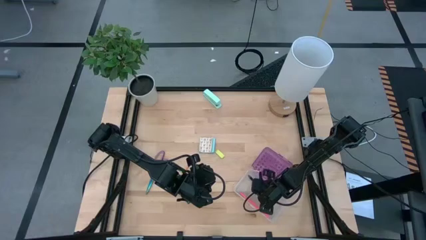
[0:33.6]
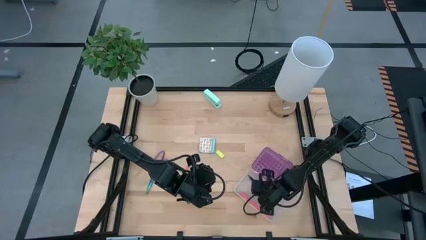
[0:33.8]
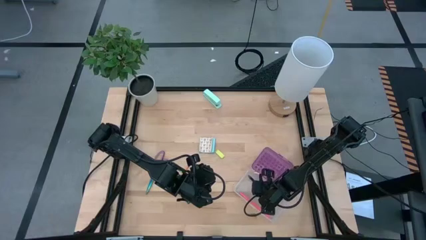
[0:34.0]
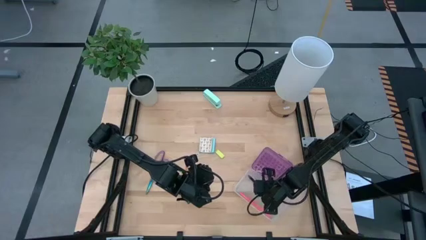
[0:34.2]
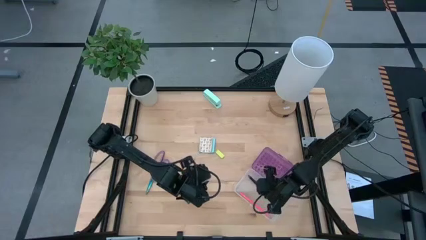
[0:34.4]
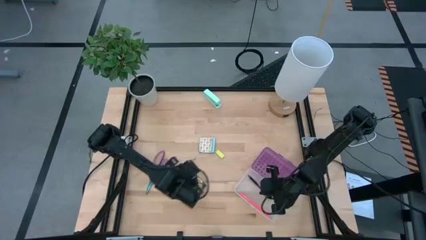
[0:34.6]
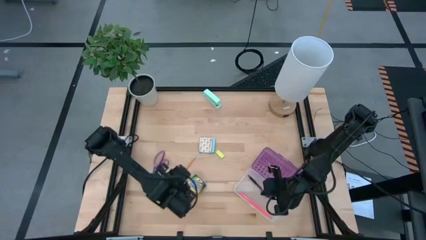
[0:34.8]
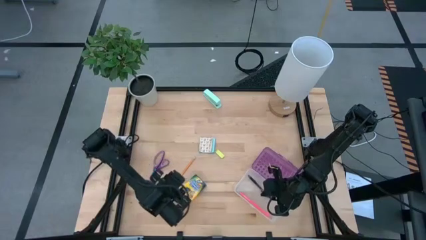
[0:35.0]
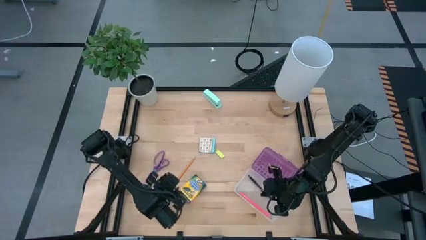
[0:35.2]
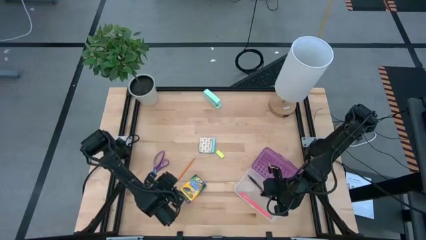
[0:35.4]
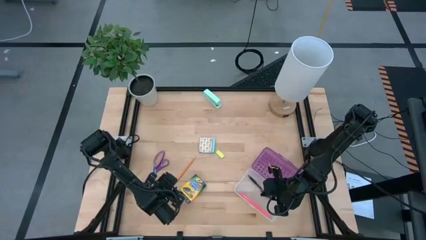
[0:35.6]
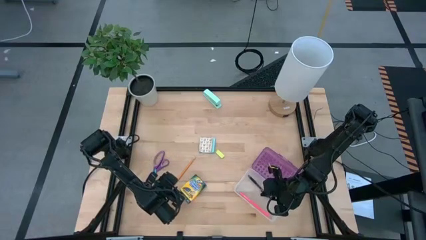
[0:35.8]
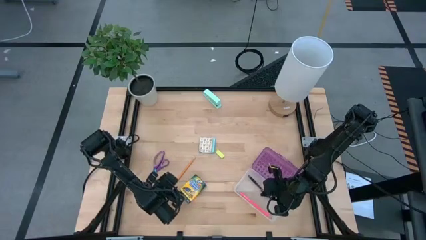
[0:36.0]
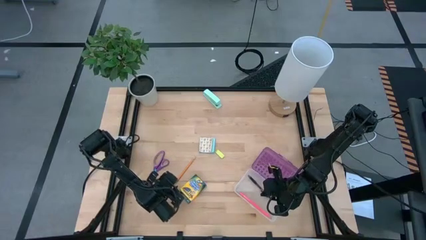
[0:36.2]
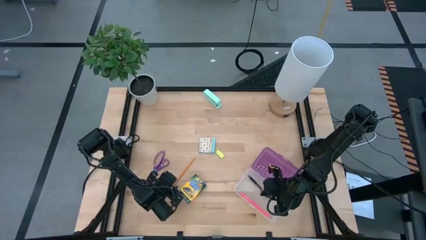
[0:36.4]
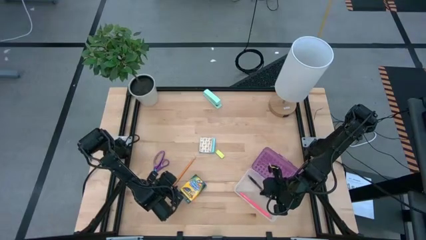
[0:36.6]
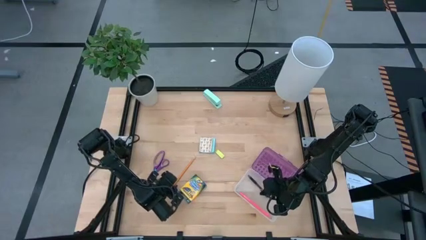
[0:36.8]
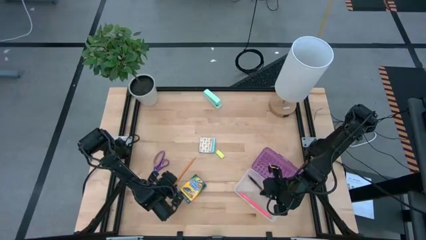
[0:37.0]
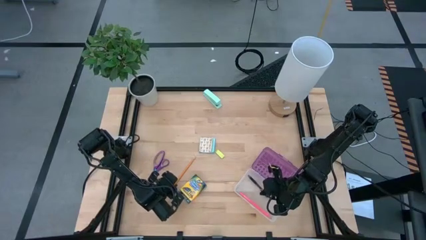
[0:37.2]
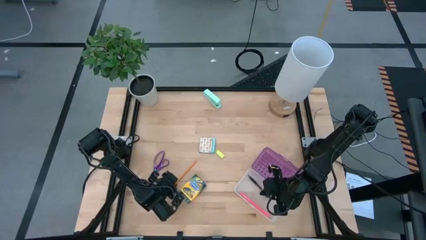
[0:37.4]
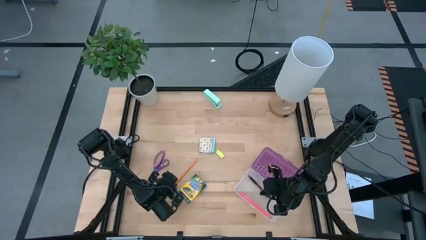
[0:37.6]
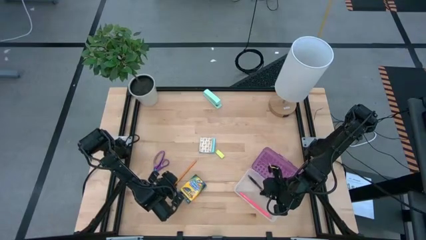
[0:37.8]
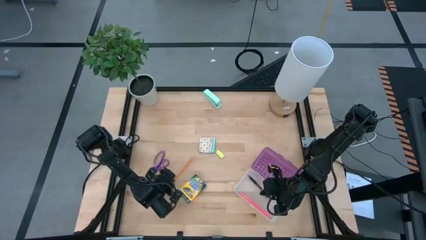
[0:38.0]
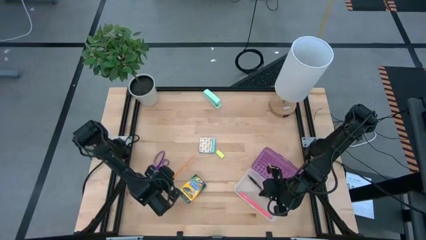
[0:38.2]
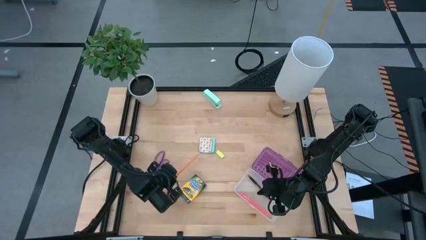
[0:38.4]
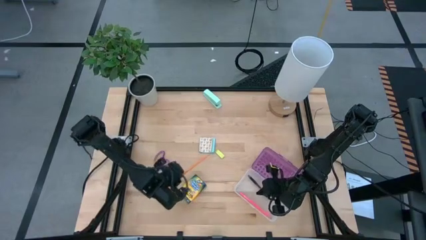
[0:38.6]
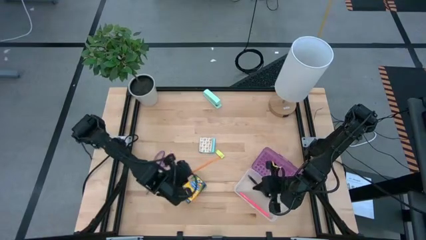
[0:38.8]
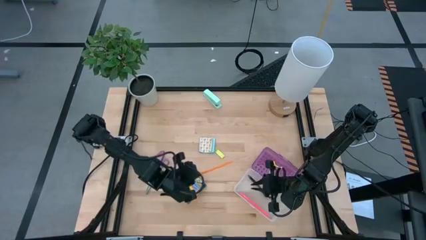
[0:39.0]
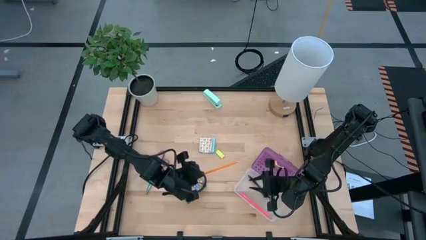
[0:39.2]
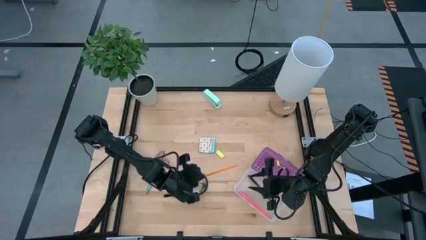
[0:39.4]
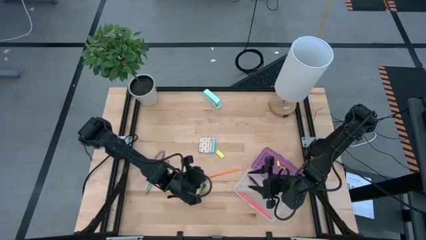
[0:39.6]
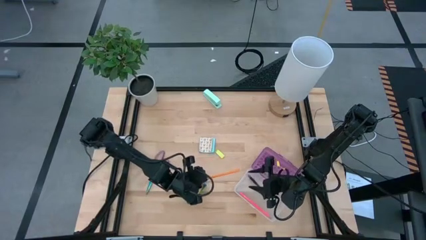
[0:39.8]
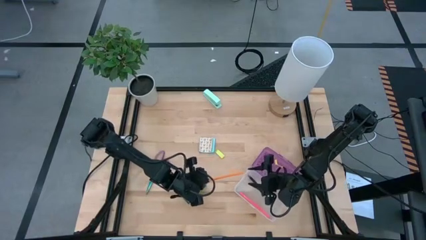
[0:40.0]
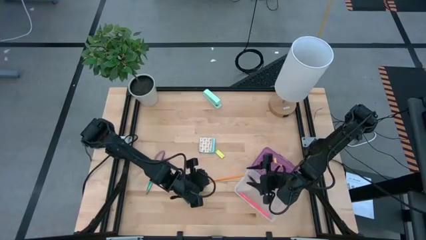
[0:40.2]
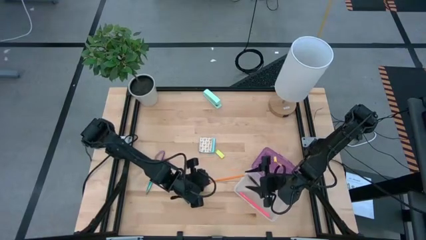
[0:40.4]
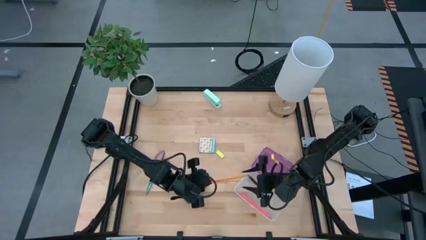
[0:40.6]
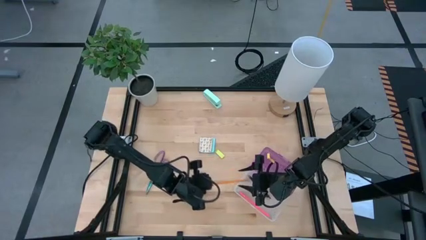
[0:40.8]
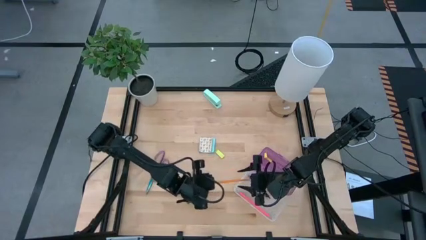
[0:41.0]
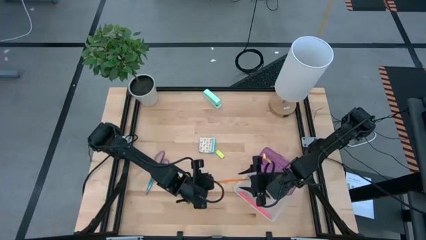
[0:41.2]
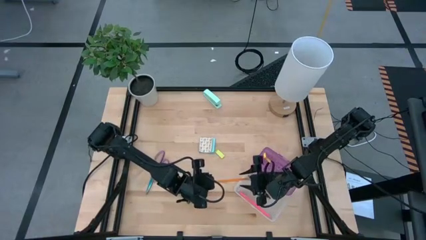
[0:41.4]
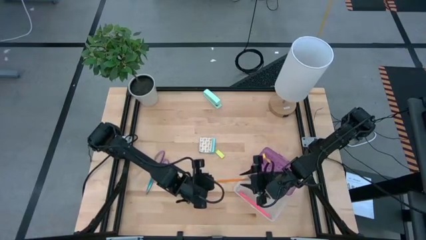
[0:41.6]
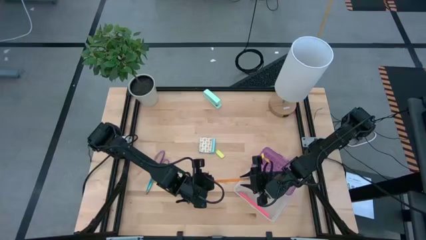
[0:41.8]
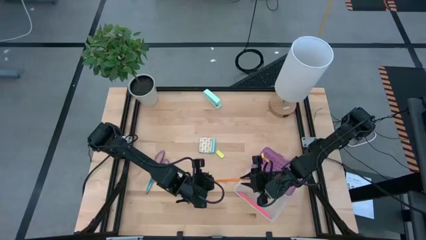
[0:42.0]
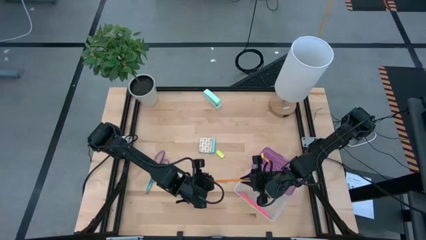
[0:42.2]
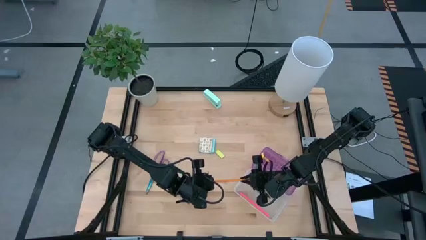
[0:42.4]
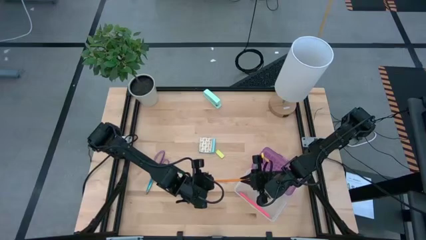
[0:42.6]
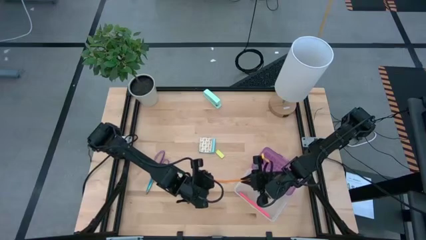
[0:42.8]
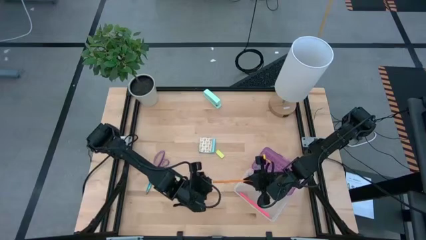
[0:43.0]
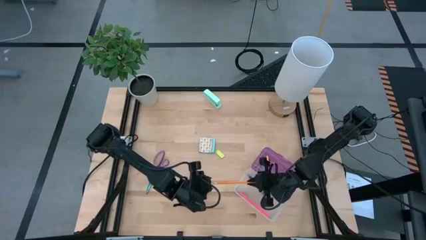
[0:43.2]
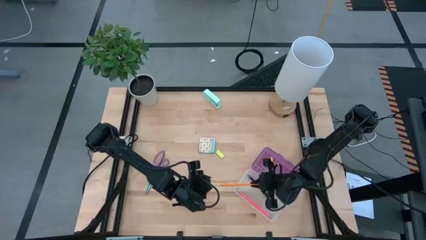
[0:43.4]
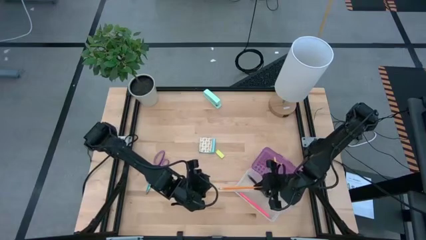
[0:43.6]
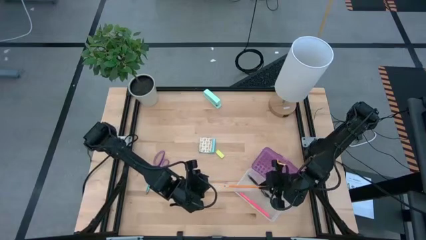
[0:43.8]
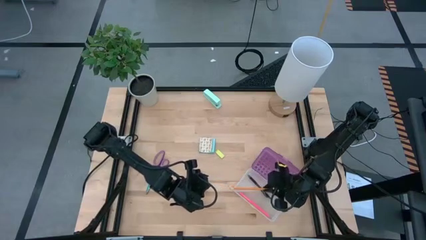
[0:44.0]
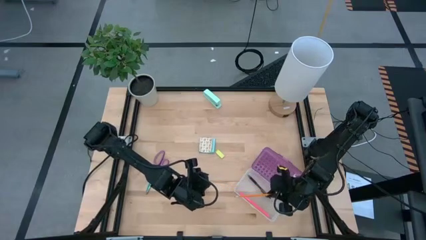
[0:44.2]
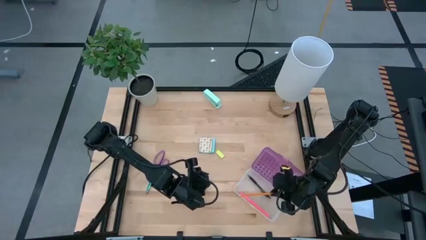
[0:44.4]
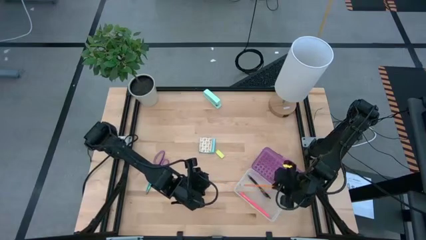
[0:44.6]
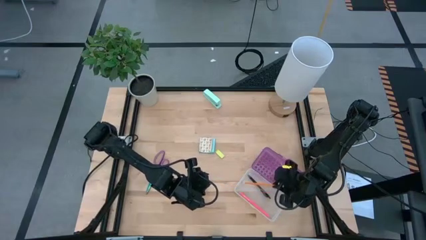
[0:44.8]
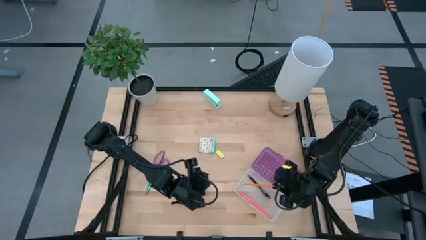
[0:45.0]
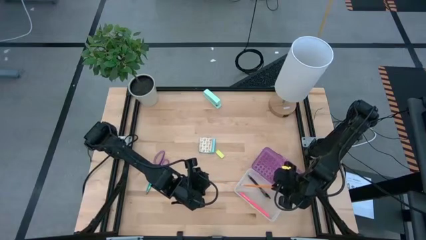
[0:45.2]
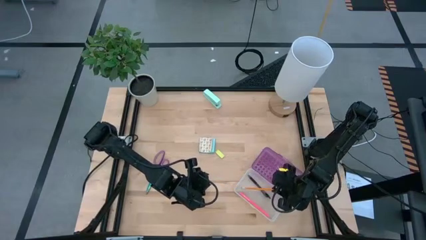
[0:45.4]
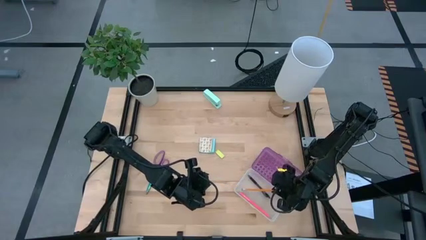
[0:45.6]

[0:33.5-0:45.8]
Task: Pack school essentials
Put the yellow pencil into the violet supply box
